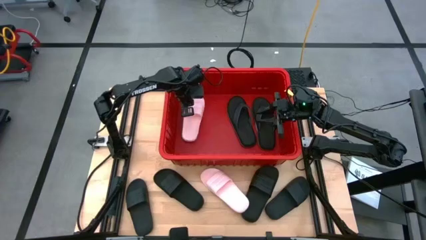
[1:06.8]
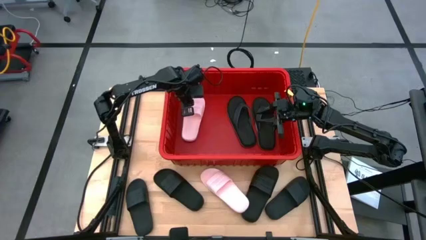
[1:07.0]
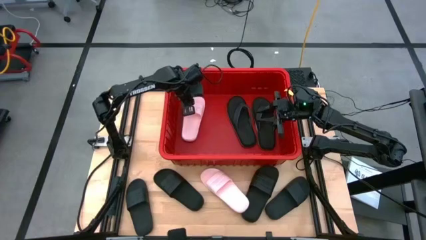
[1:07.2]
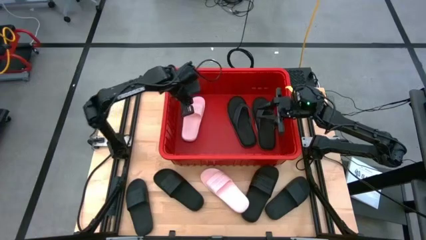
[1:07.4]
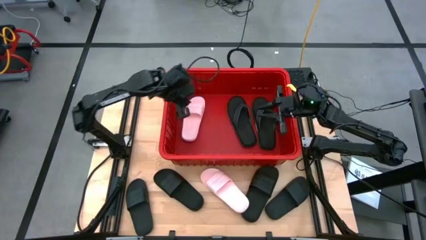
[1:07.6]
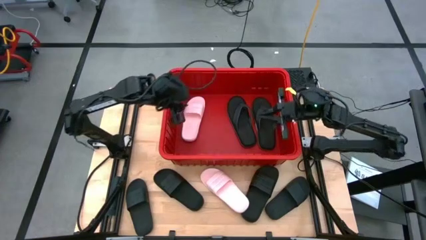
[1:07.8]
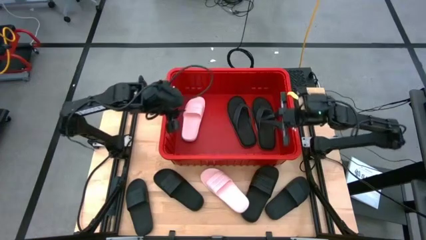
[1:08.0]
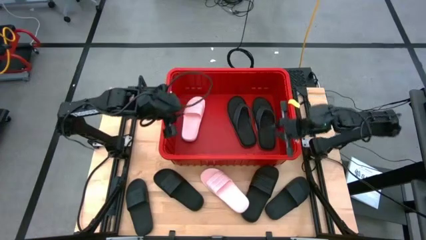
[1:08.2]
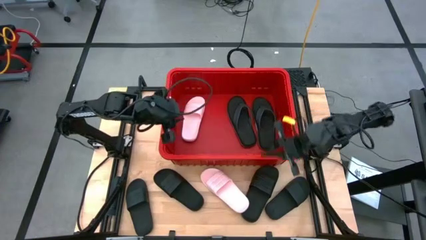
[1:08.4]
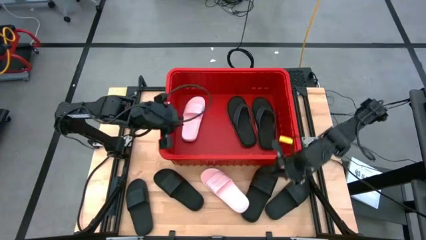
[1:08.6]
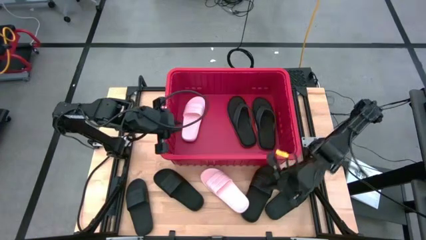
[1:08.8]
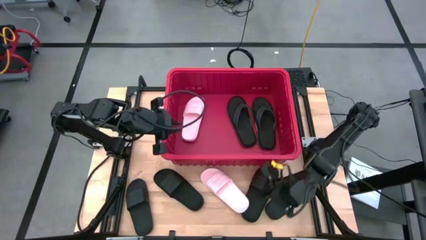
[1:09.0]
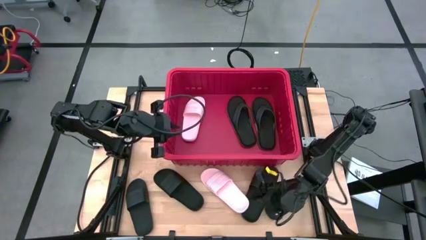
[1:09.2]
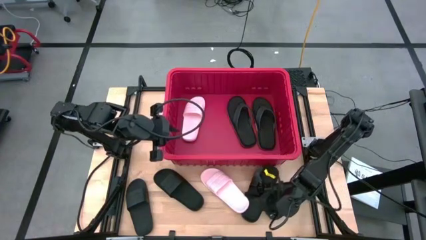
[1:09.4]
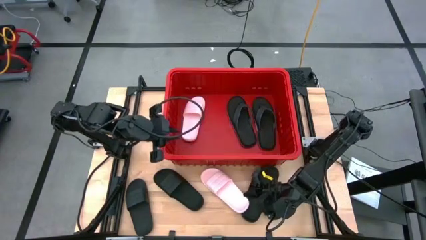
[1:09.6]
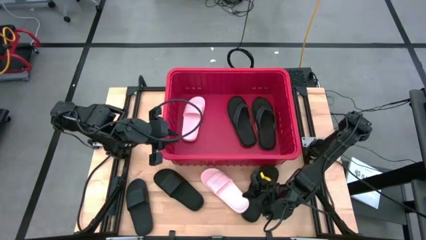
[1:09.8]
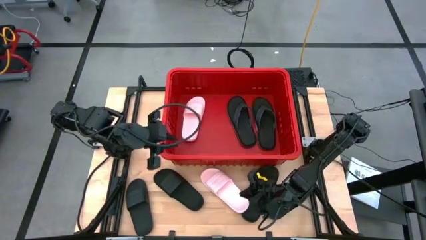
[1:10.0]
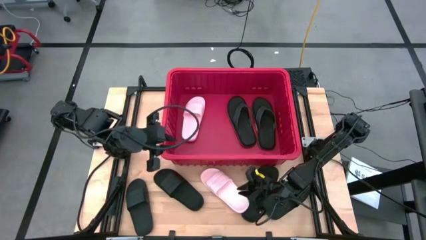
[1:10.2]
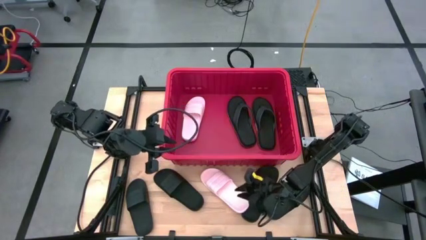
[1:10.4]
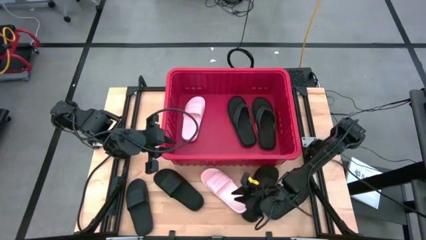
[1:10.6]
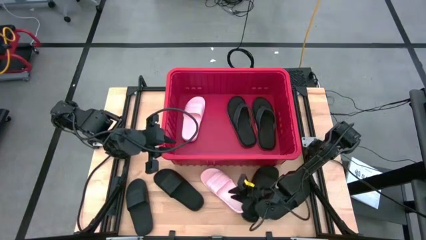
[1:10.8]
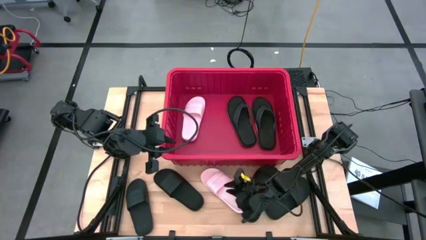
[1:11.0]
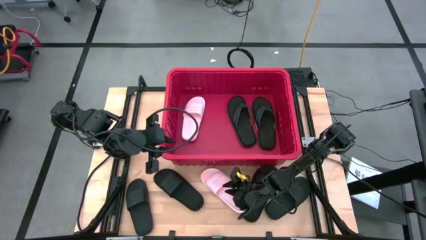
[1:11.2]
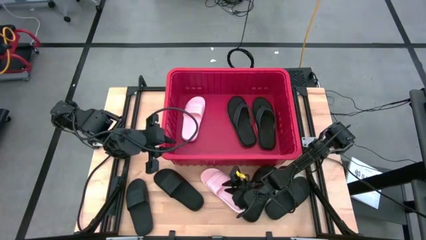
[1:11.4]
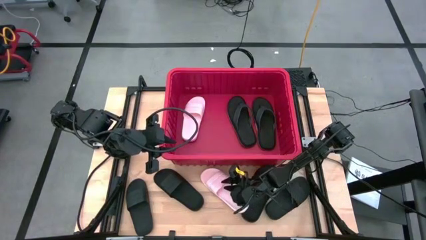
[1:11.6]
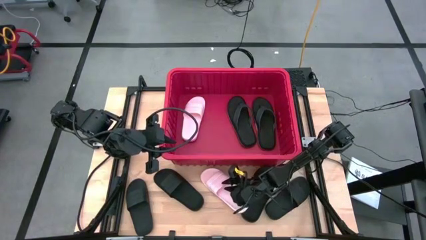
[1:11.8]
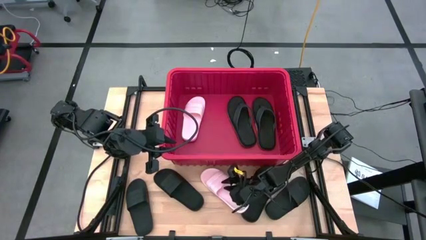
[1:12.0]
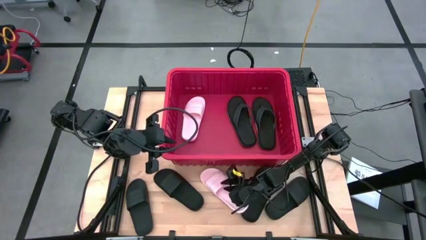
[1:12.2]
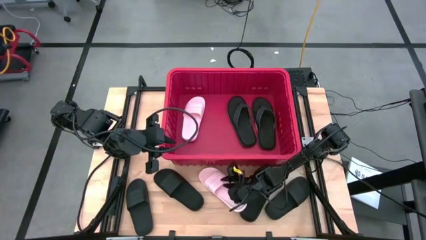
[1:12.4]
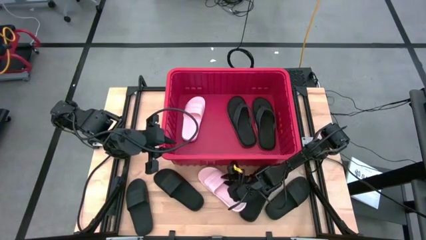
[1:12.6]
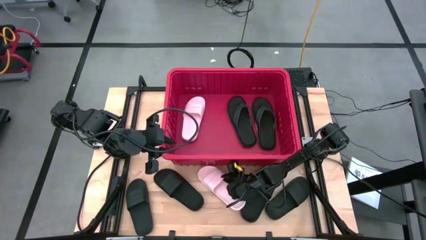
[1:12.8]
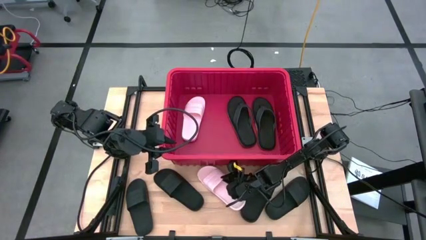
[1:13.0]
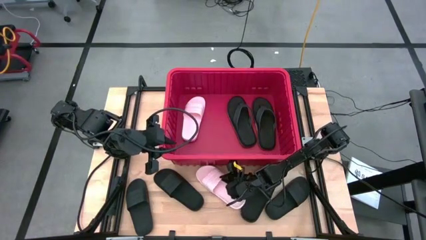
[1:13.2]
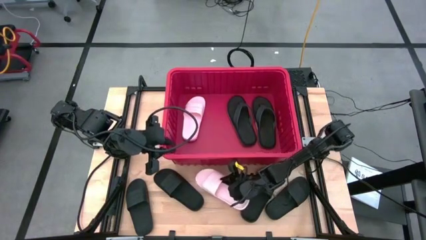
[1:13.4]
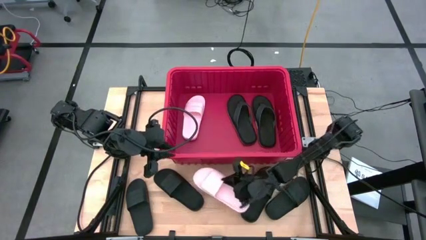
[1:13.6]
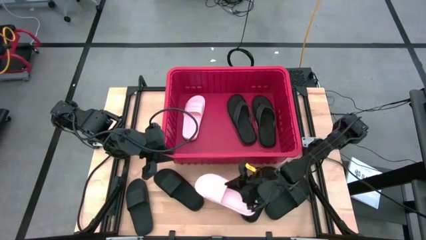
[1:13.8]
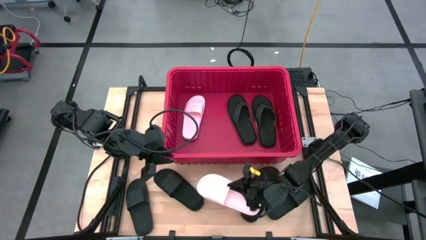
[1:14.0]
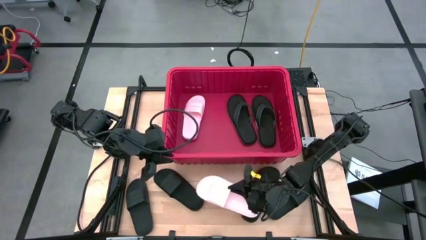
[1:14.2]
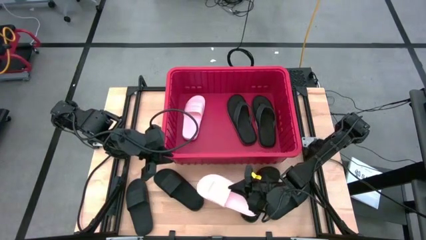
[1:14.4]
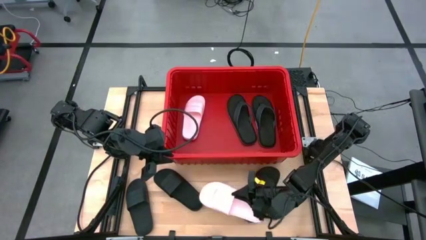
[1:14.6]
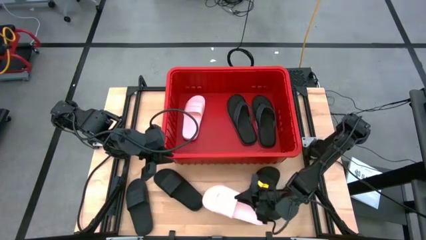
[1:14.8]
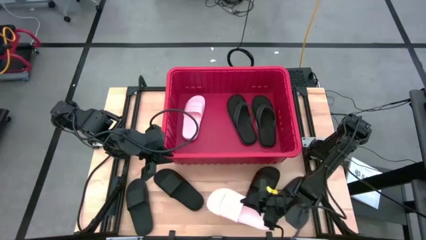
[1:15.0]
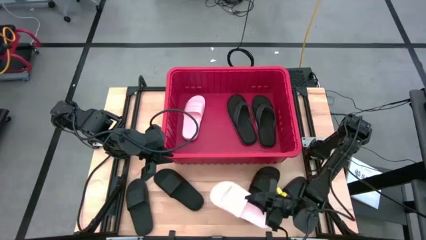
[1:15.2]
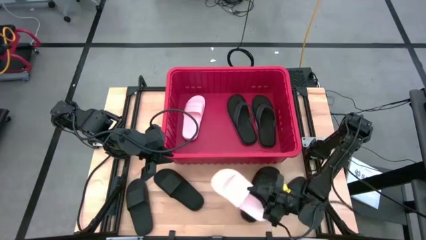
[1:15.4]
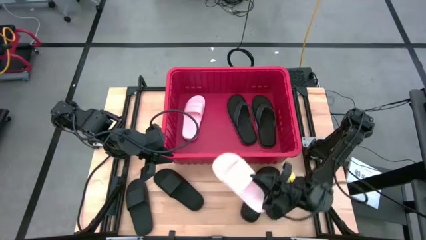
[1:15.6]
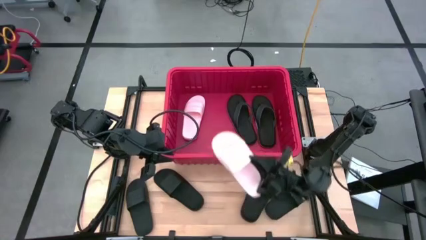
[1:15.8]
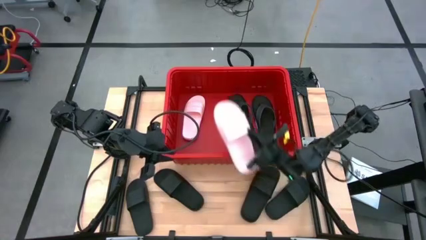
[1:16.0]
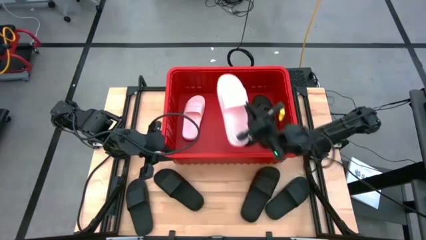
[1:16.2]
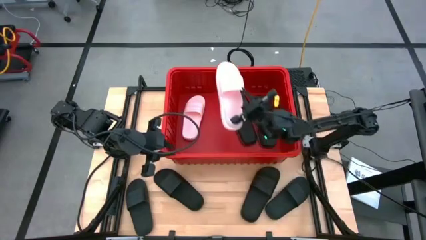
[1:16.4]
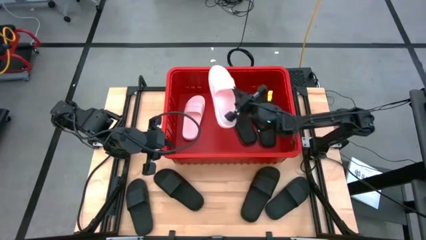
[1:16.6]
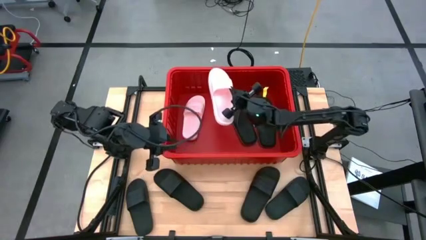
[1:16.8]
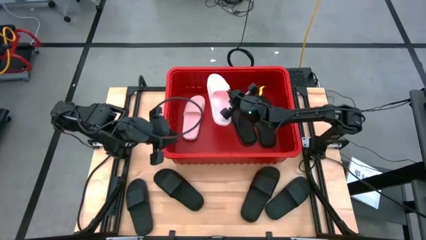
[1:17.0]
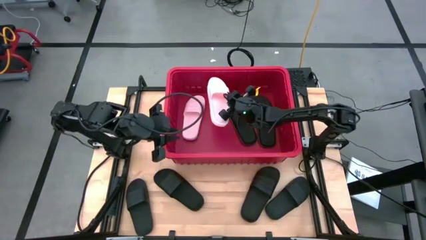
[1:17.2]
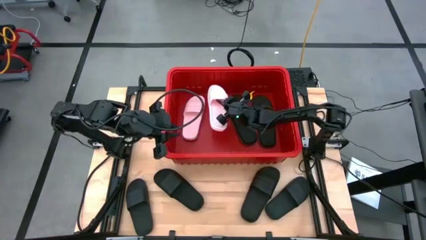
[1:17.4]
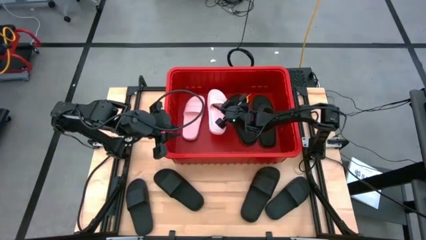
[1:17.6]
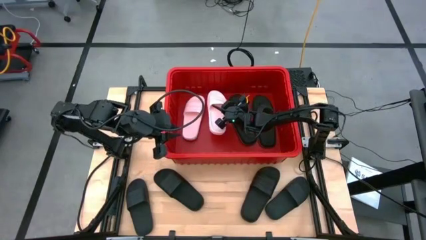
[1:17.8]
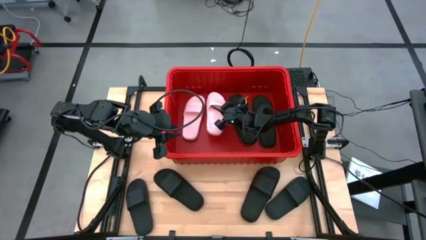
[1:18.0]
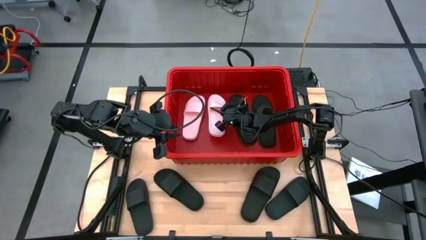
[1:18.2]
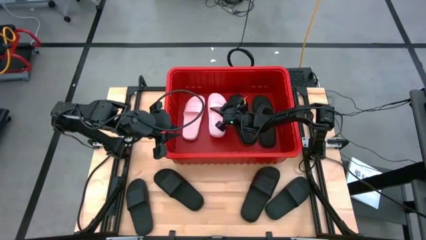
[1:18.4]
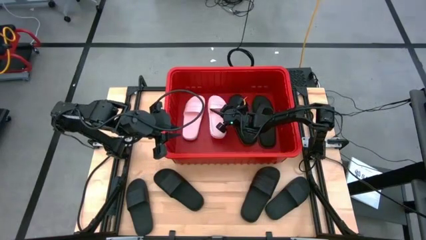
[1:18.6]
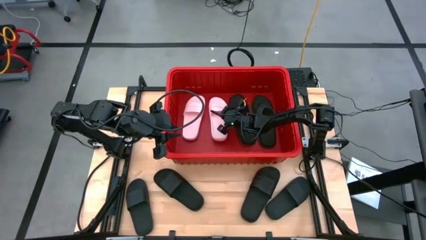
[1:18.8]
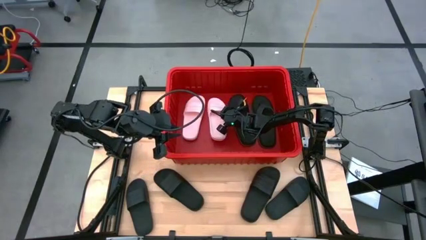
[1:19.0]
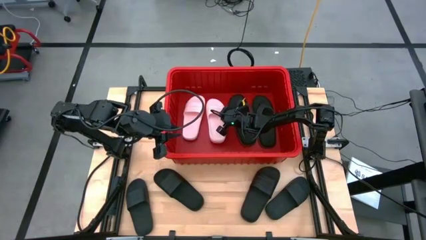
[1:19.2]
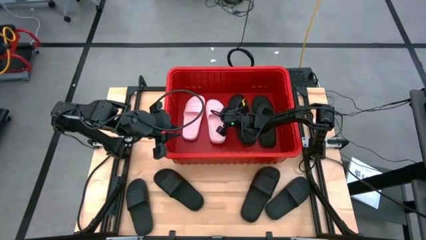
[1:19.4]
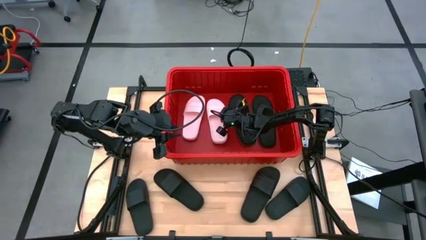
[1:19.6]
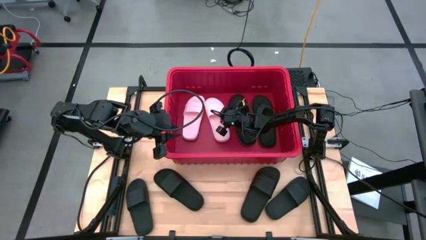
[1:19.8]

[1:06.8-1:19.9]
Task: Pick and place slides into bin
Put the pink slipper into the red bin

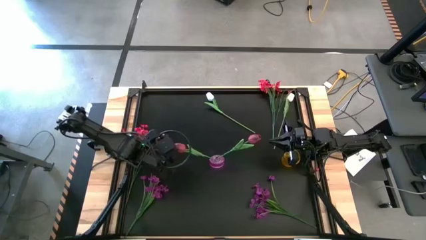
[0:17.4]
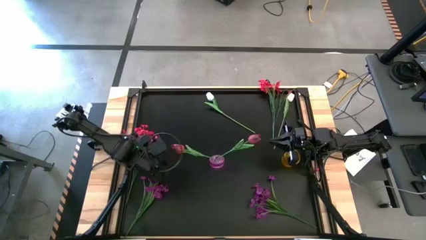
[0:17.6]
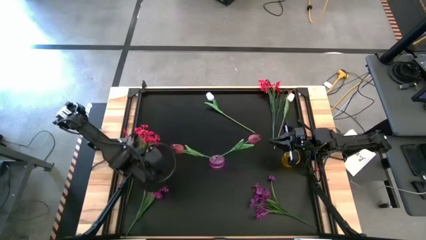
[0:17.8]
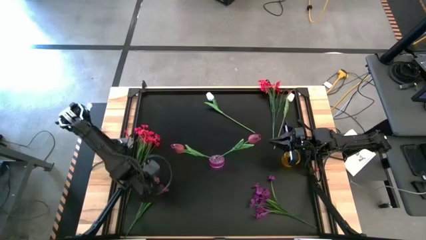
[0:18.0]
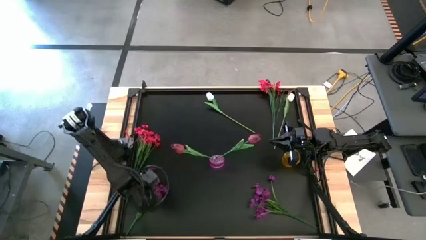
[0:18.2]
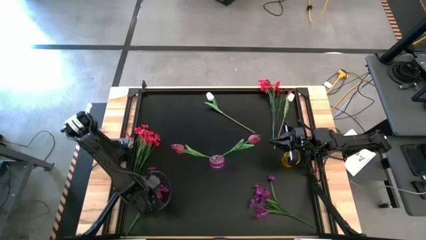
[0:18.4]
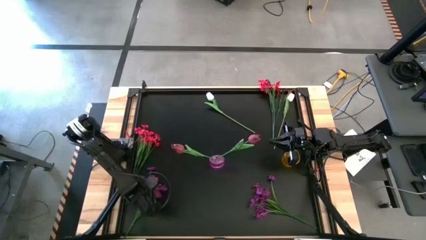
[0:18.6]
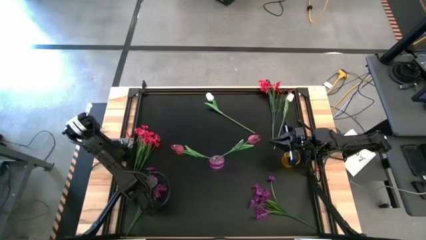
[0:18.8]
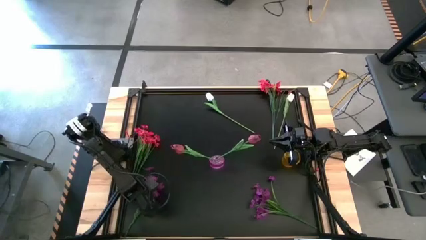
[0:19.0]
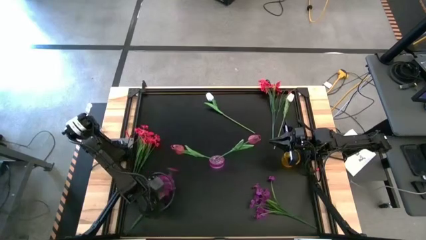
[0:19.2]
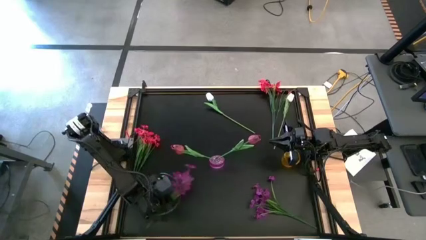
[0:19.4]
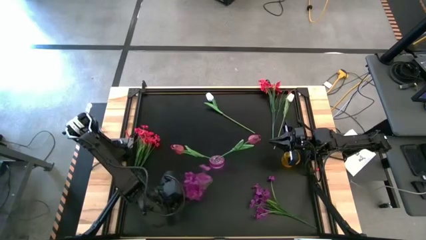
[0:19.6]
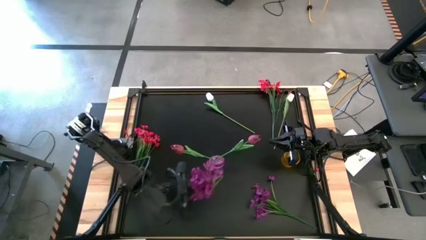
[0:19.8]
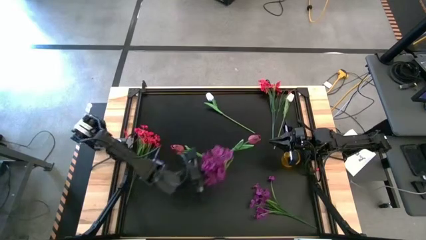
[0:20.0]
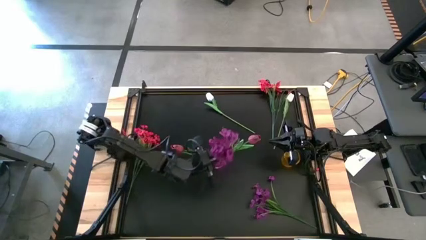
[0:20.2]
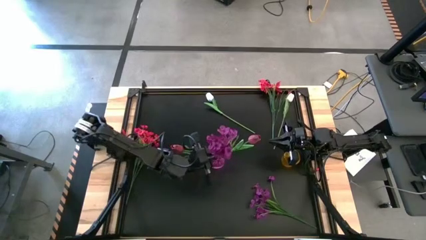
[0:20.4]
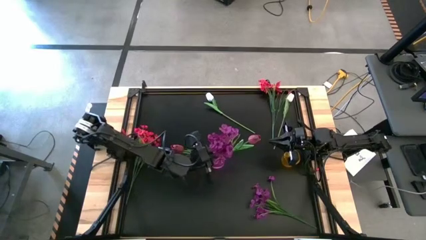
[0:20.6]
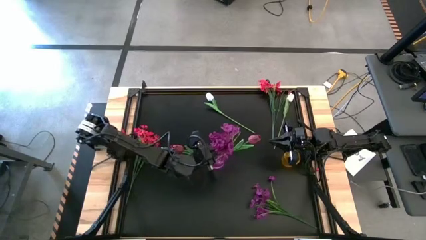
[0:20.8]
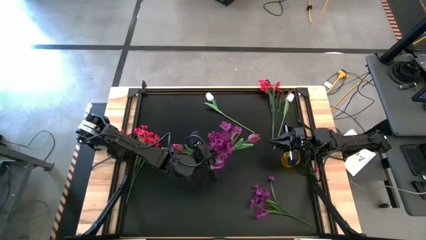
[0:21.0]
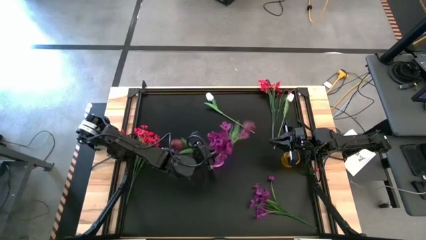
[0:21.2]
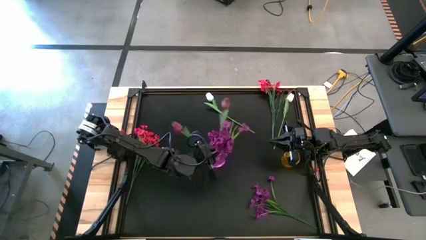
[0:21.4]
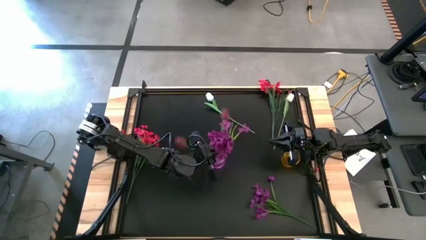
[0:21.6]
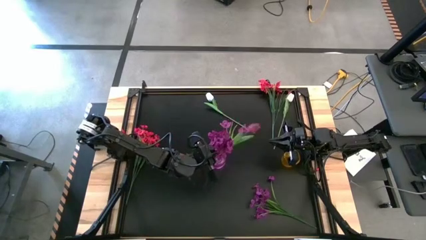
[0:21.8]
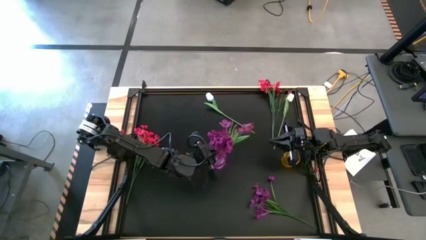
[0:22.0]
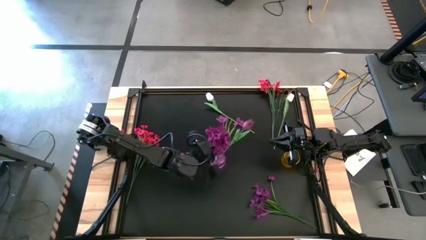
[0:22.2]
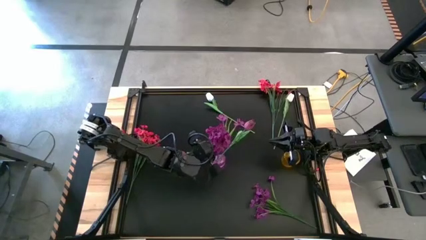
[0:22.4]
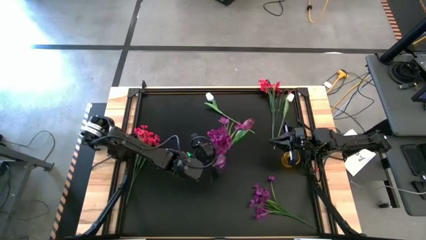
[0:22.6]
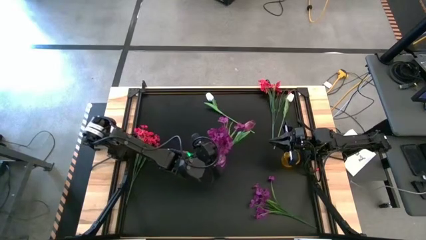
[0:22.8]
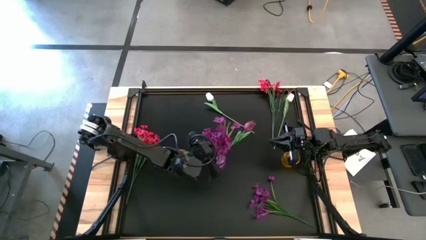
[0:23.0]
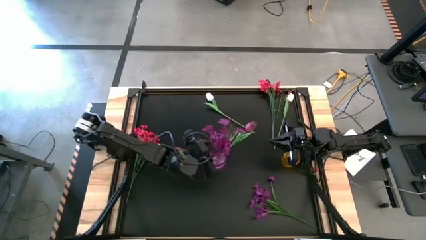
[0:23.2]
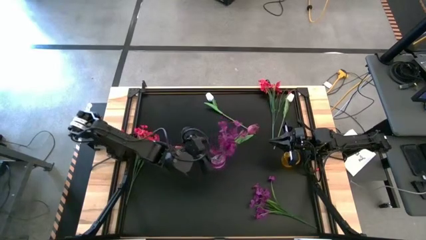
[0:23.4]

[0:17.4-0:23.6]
Task: Sort flowers into vase by color
Put the left violet flowers into the violet vase
